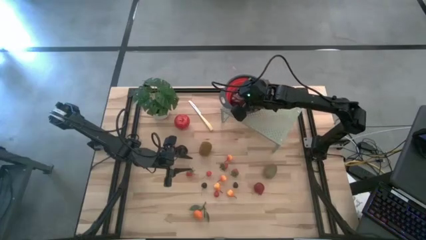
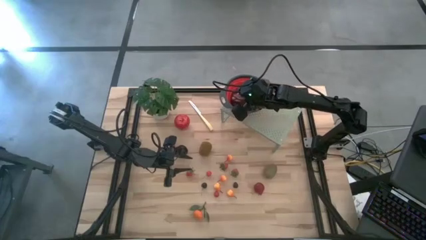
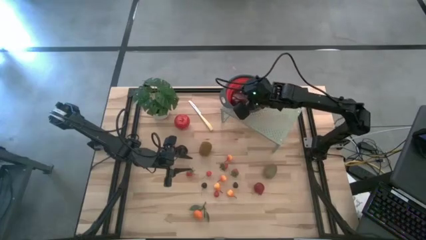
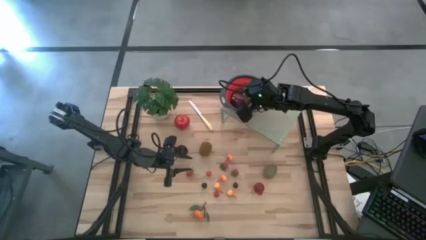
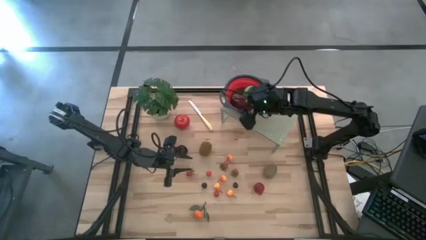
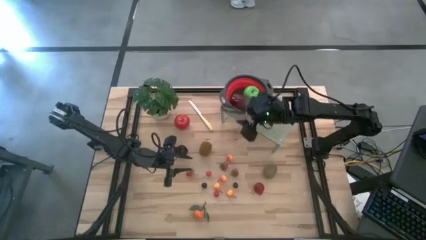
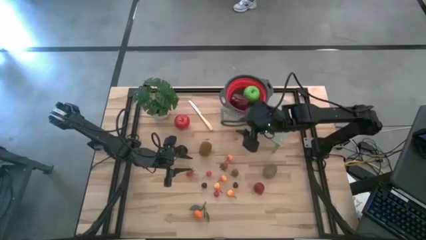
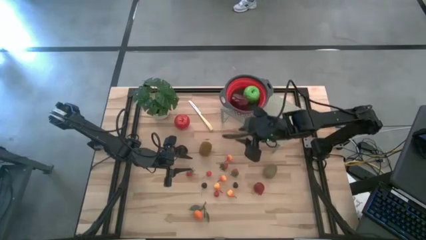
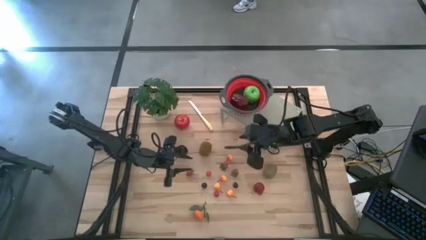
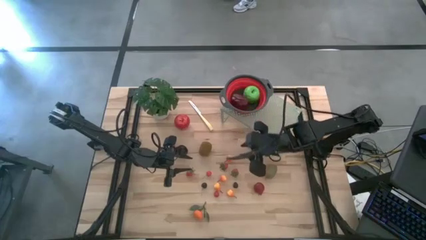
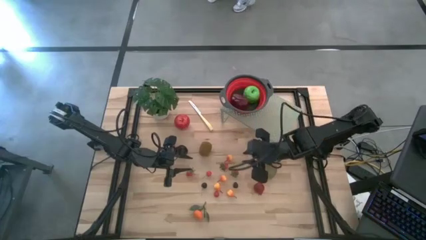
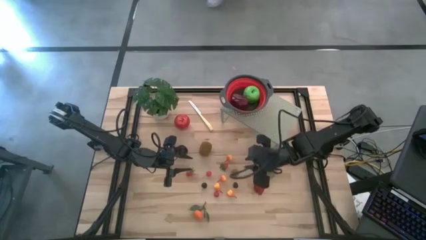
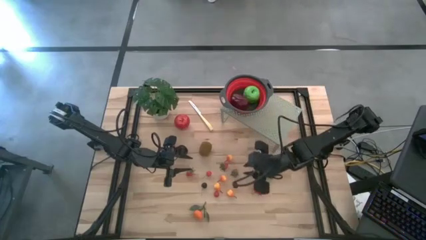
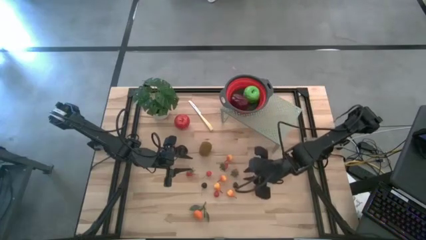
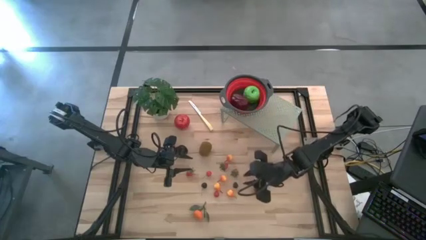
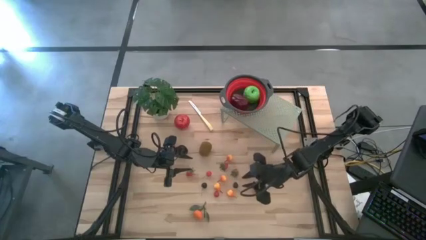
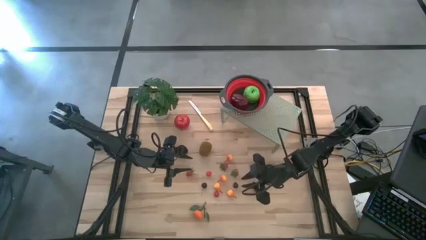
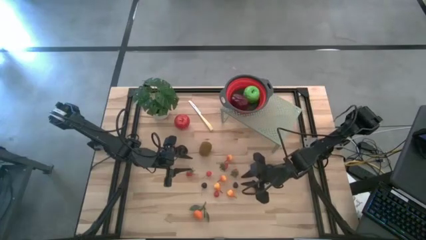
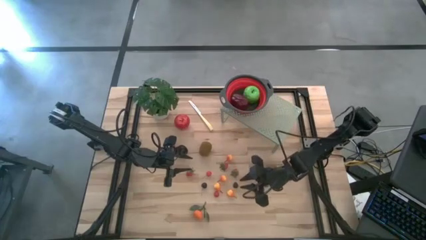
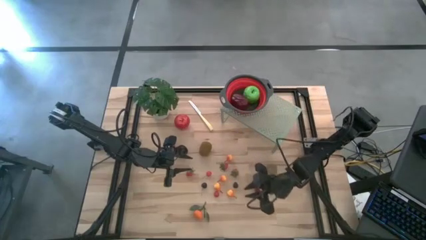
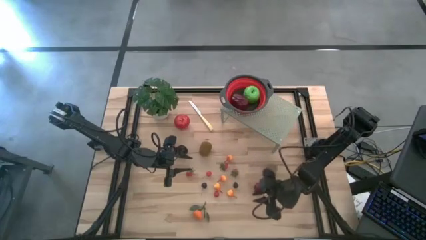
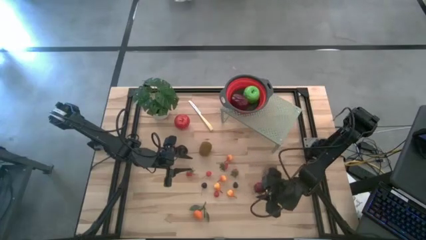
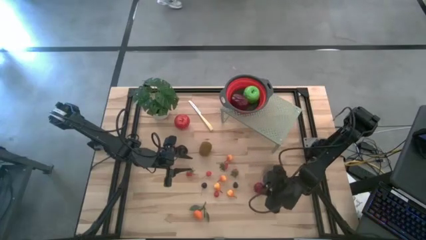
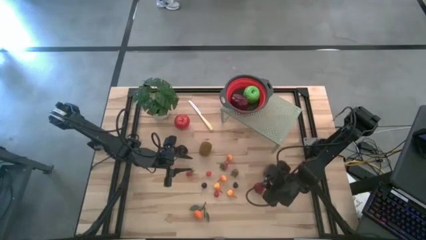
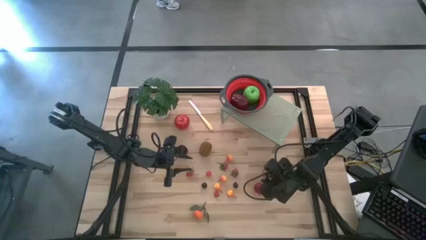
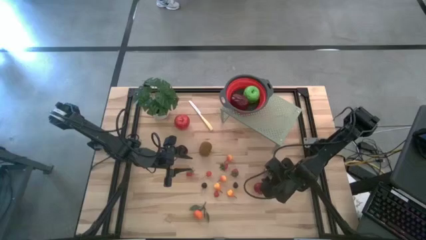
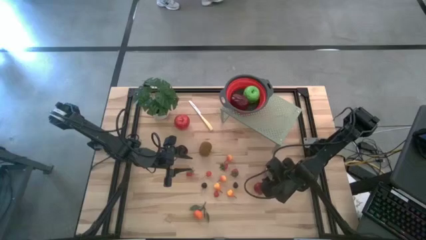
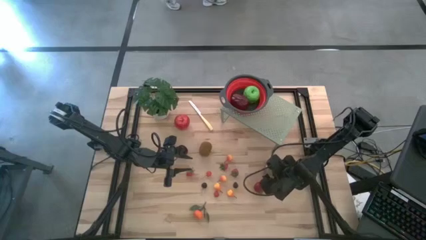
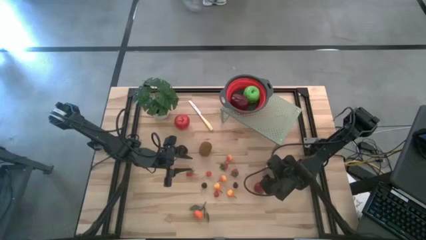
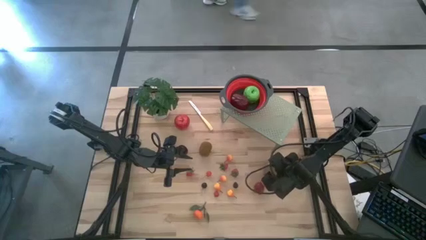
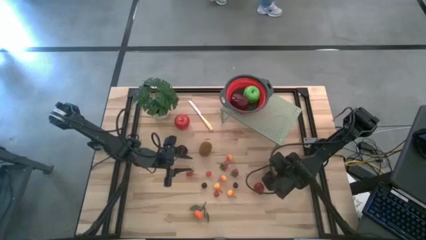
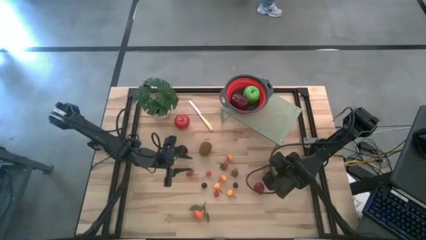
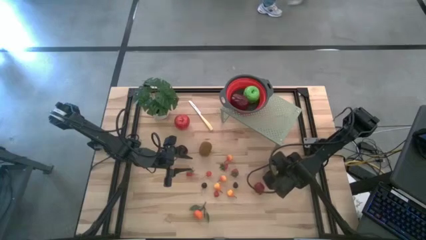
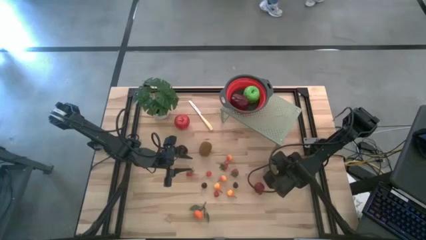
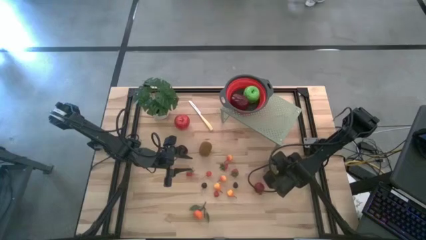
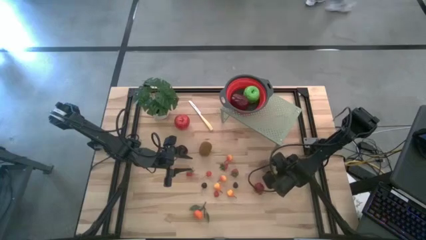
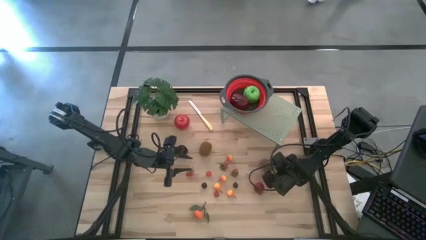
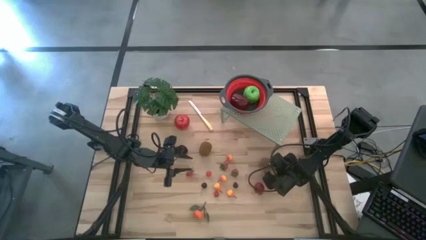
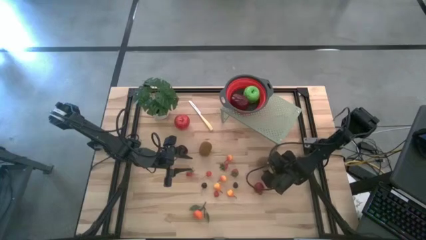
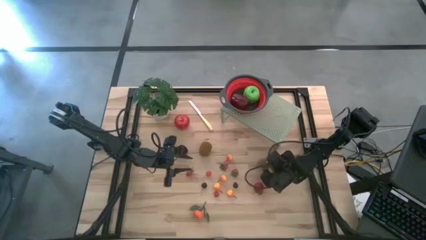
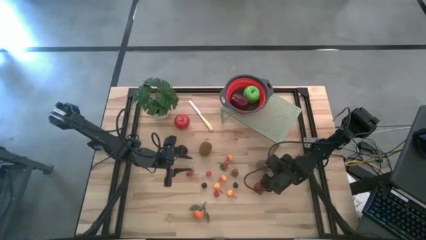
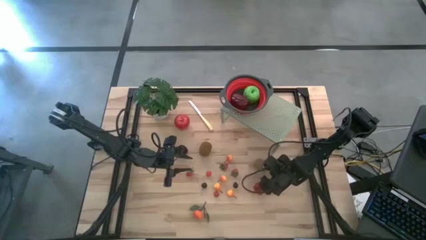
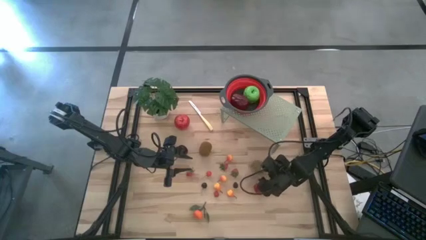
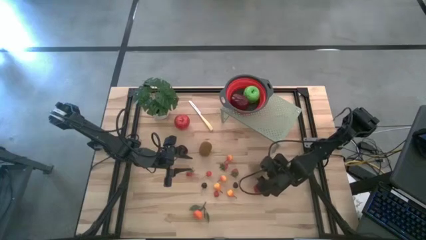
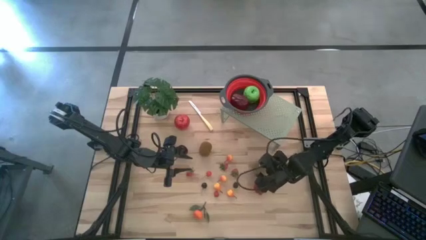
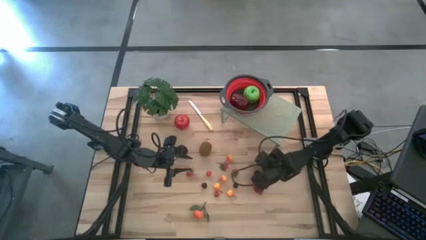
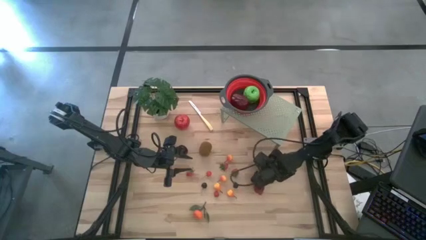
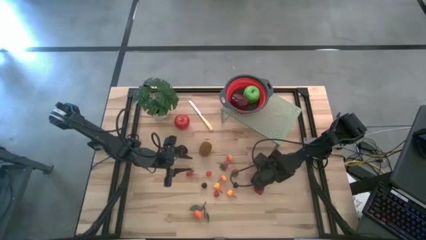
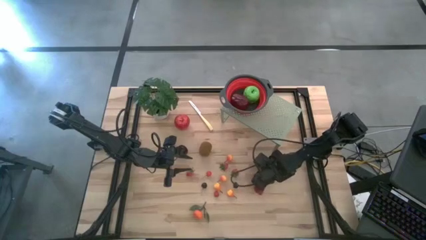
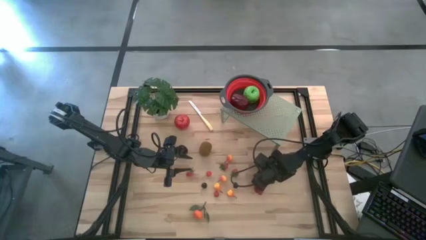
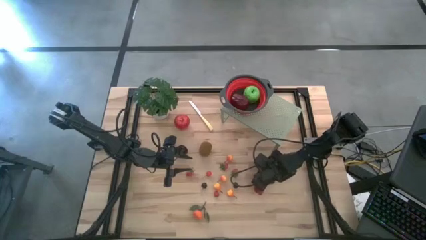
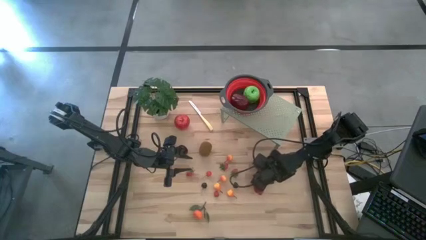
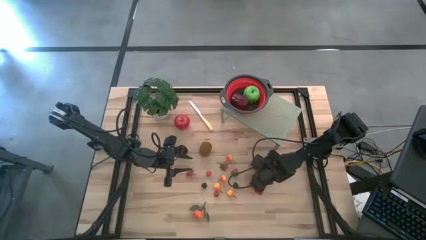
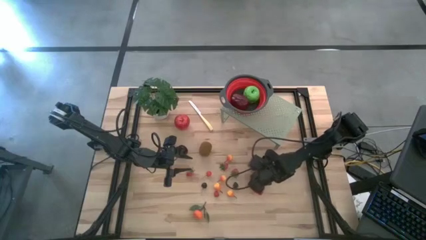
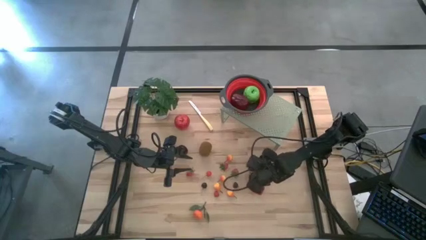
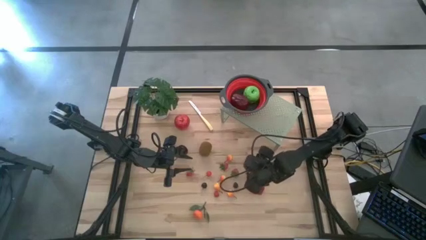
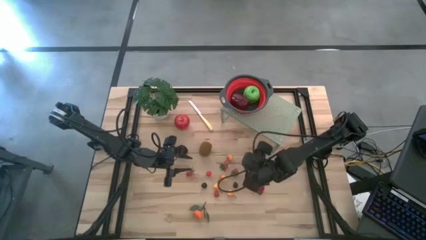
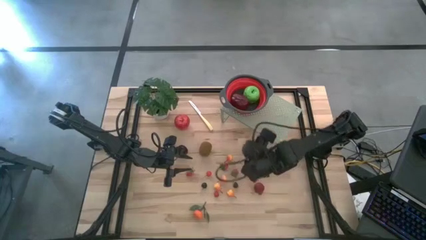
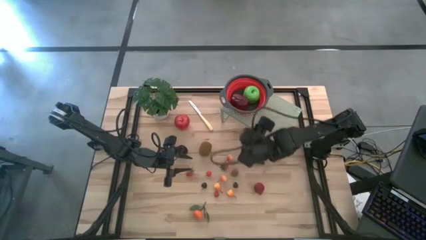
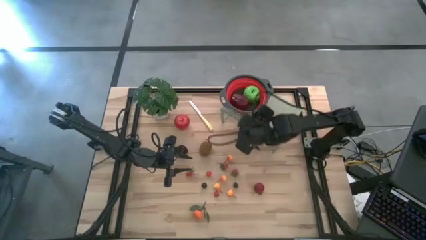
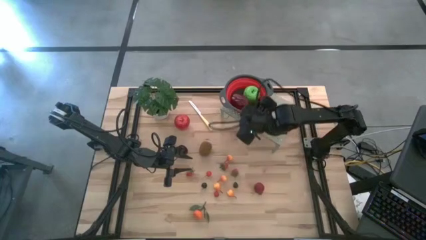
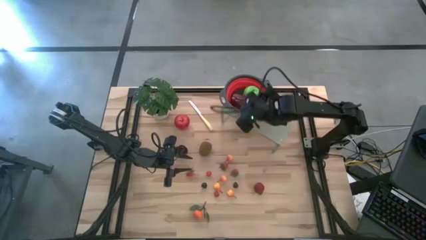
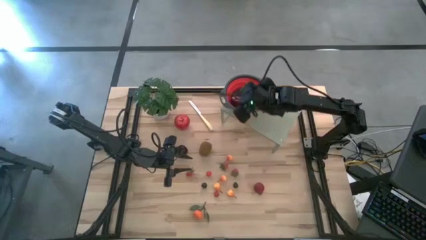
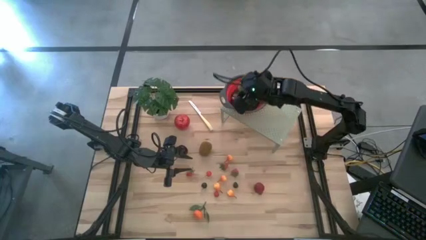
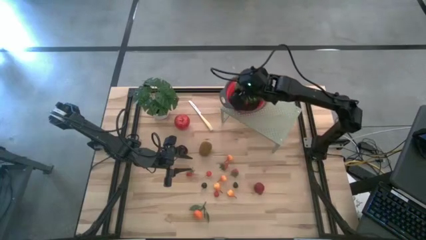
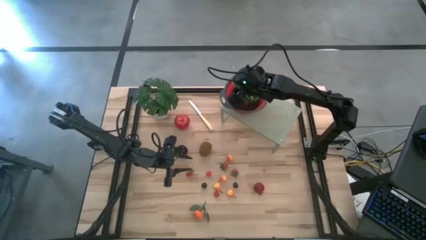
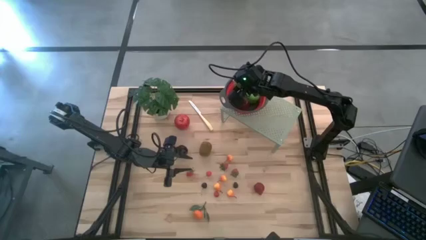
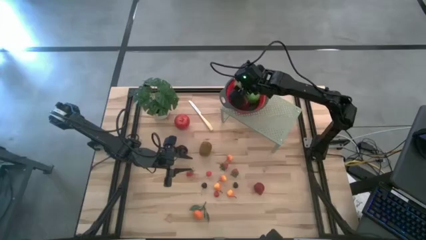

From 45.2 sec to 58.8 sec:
Task: Pick & Place Fruit
Put the kiwi into the red gray colander on the shelf
